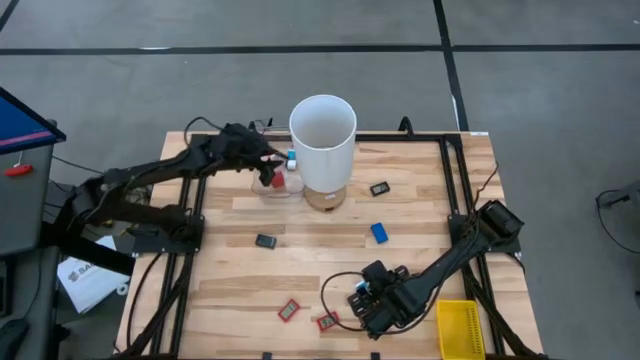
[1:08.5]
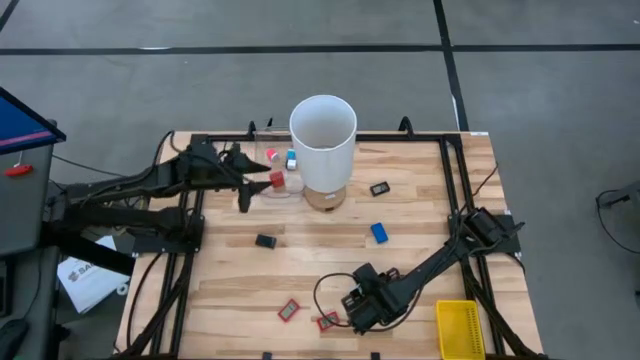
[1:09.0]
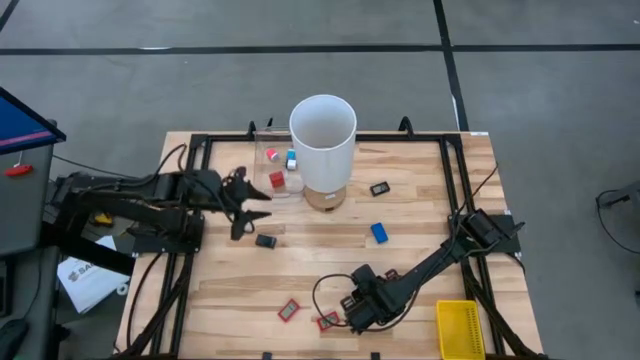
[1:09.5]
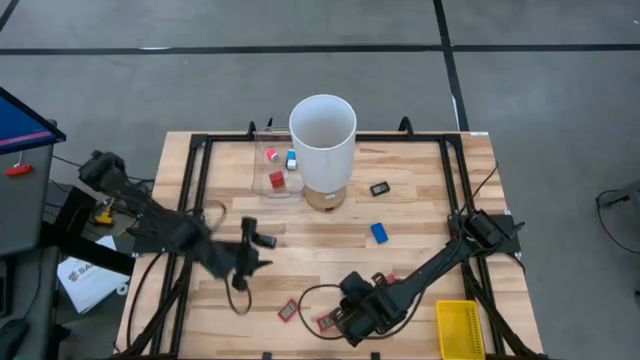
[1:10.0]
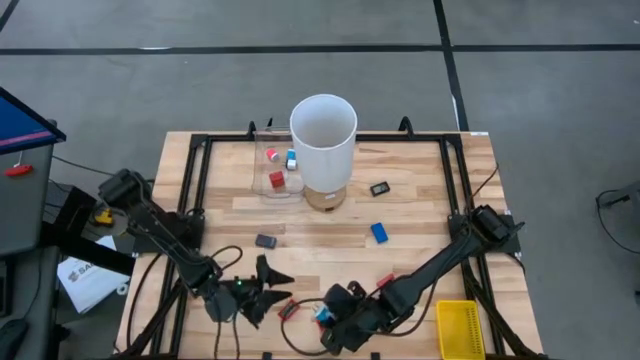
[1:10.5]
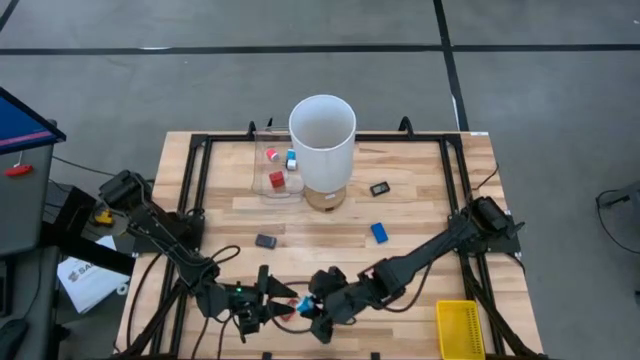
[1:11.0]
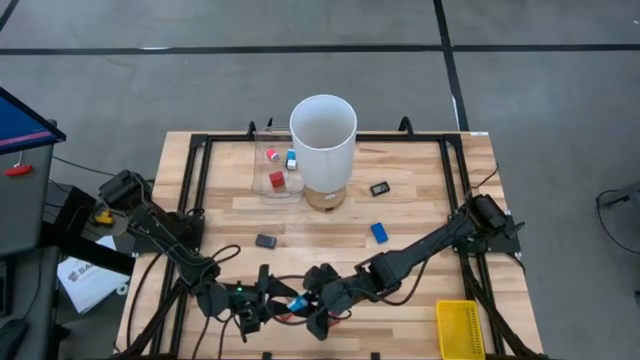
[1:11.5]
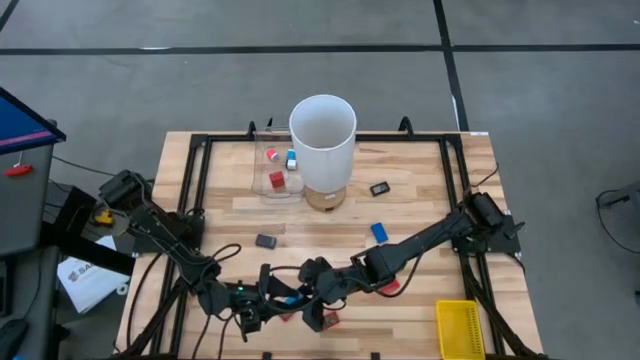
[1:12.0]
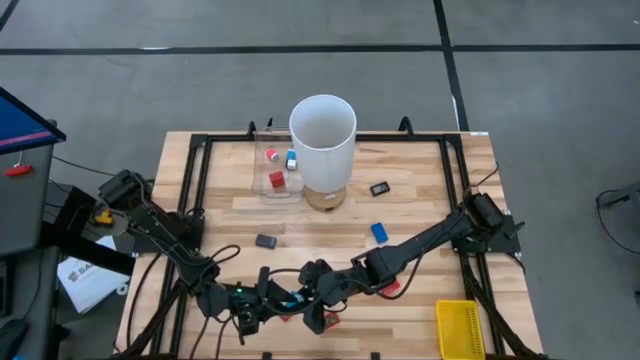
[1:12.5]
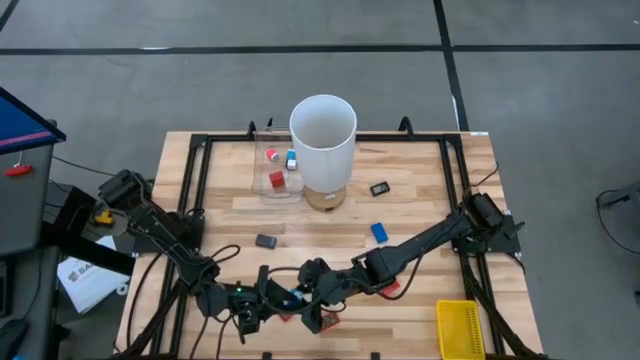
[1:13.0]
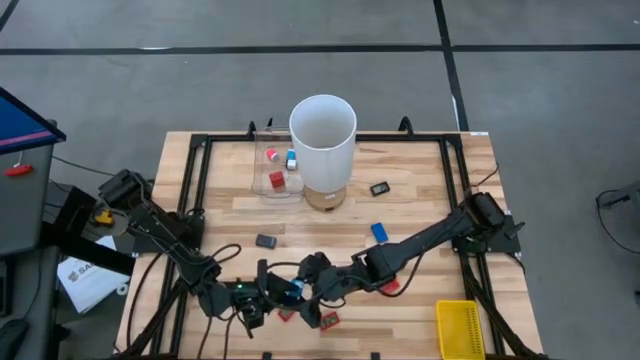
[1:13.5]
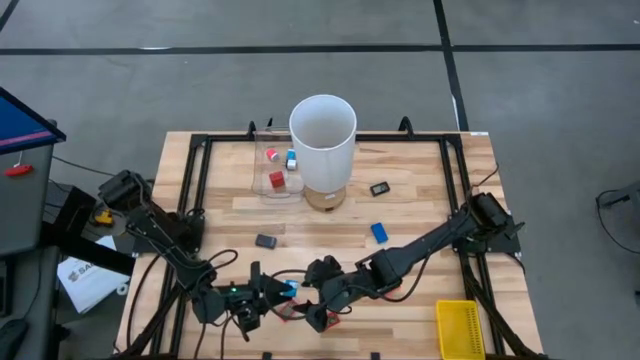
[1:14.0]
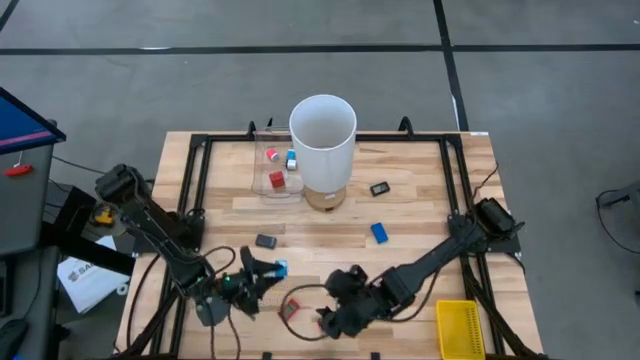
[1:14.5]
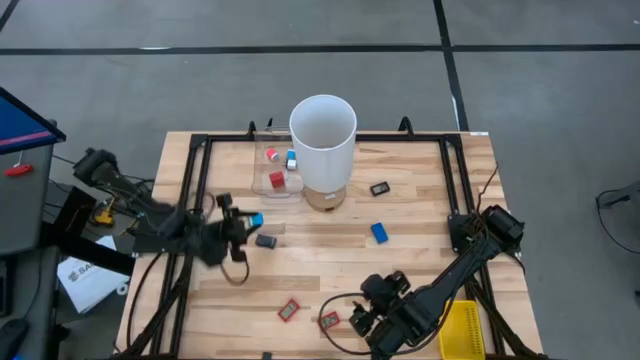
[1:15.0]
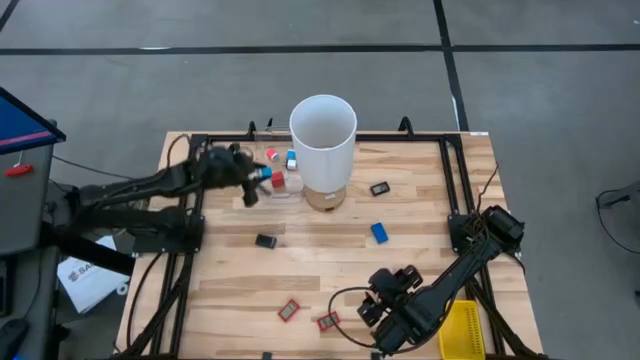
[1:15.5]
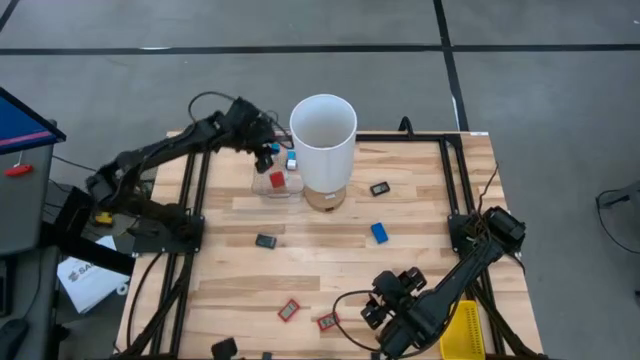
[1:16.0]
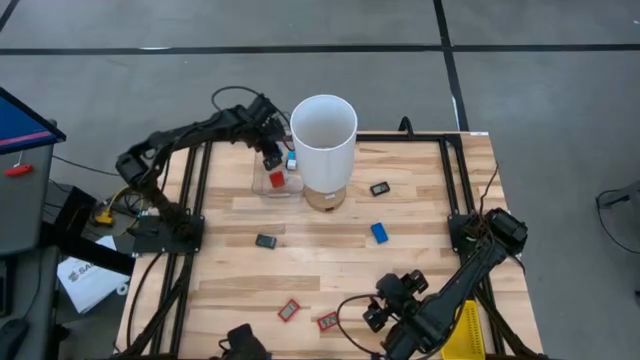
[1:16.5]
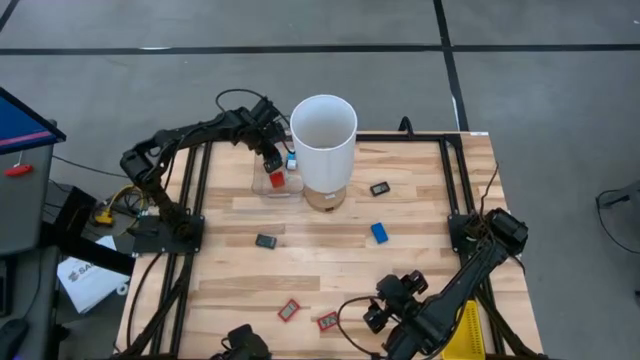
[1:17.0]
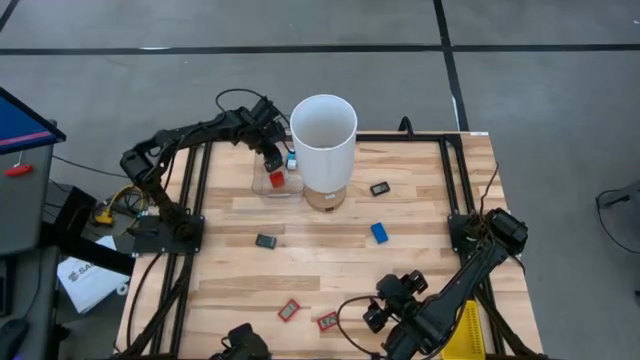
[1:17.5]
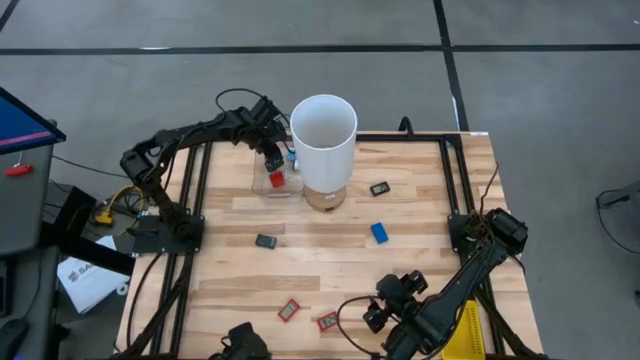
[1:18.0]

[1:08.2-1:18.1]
Task: Pick & Place Office items
Put the blue charger adapter into the transparent bin

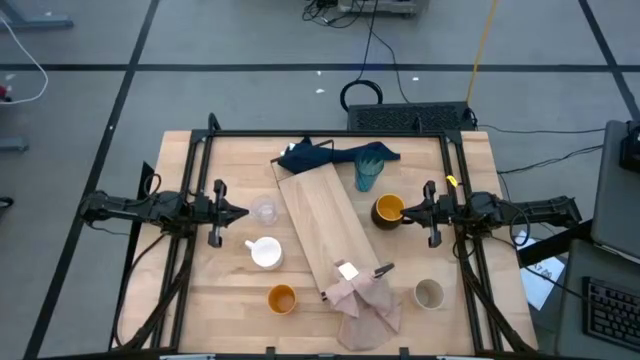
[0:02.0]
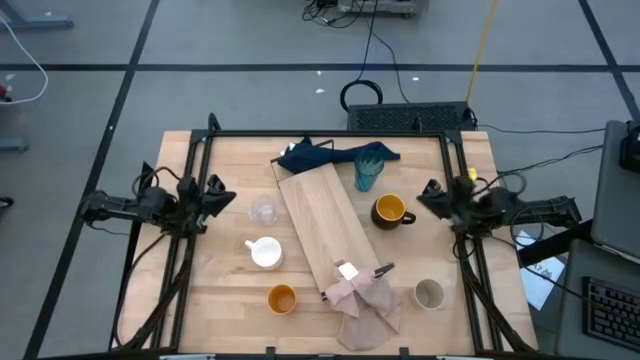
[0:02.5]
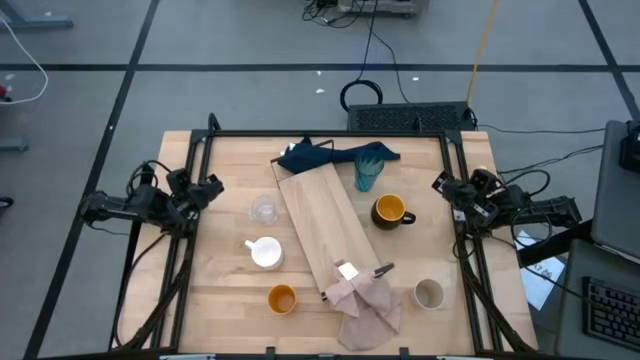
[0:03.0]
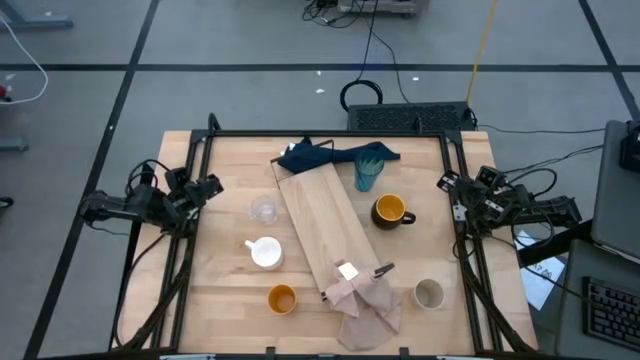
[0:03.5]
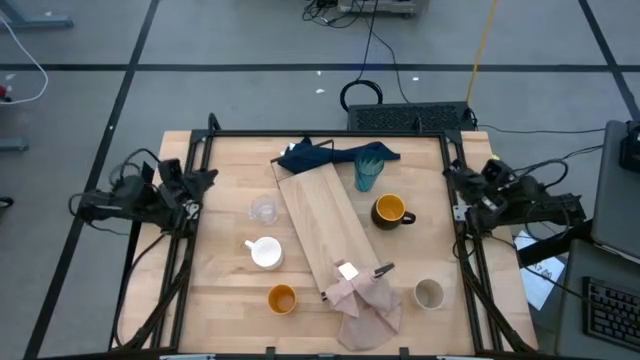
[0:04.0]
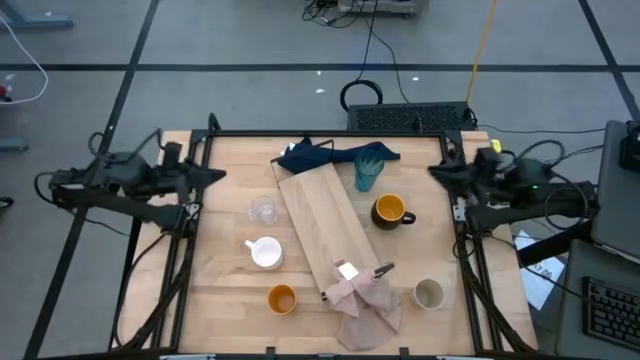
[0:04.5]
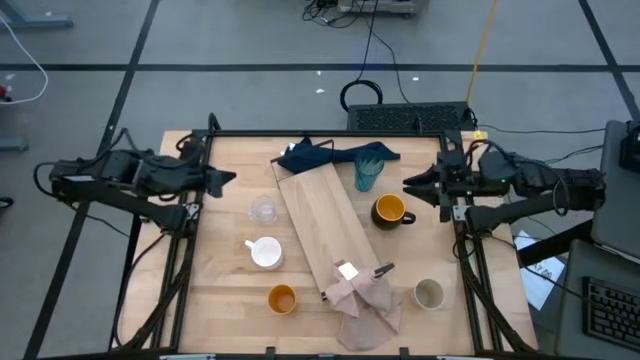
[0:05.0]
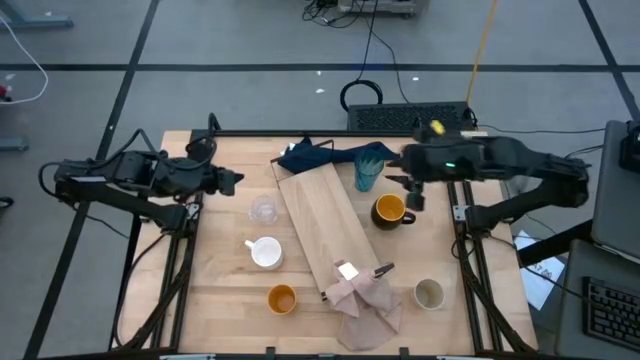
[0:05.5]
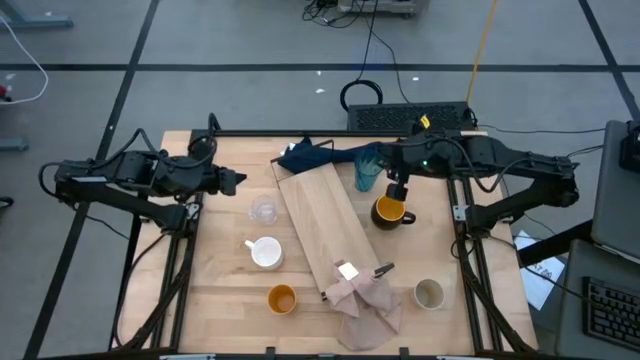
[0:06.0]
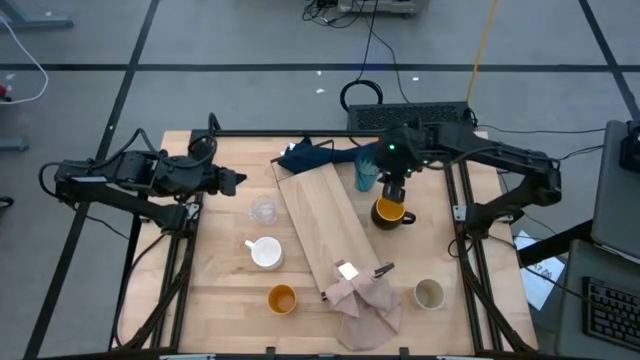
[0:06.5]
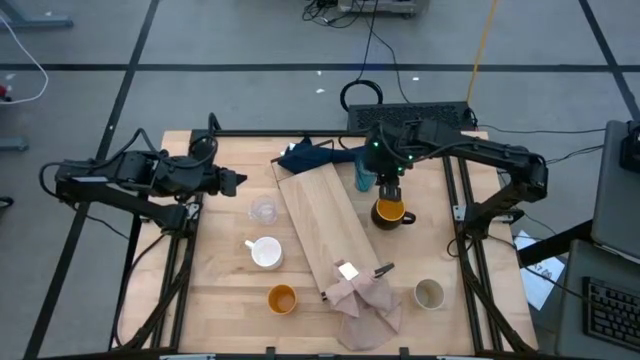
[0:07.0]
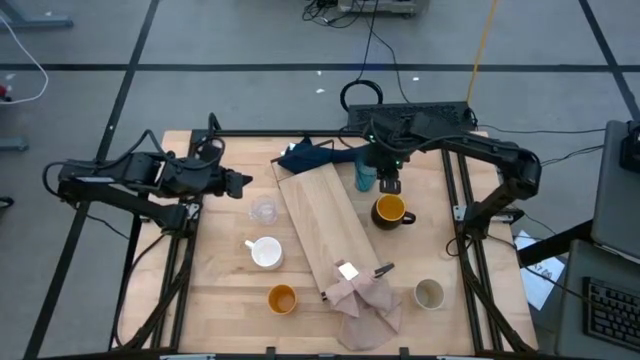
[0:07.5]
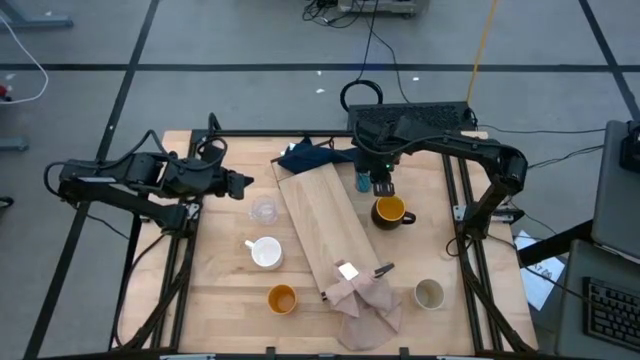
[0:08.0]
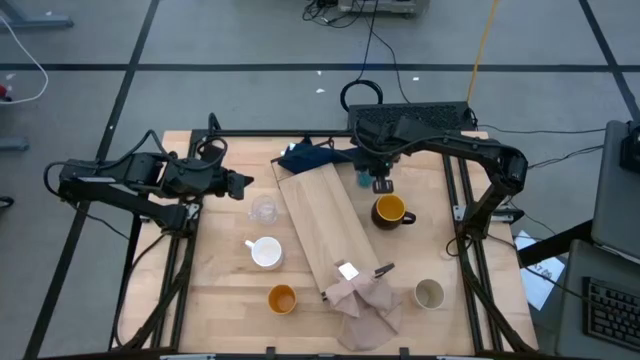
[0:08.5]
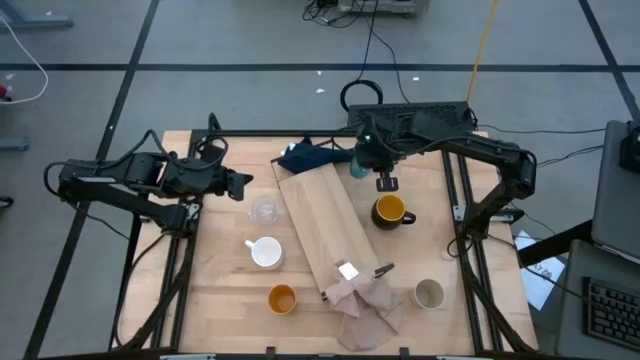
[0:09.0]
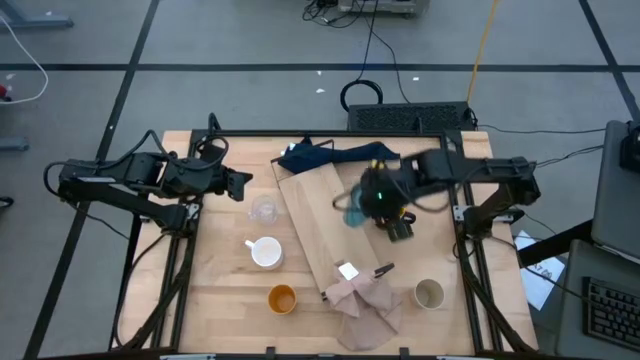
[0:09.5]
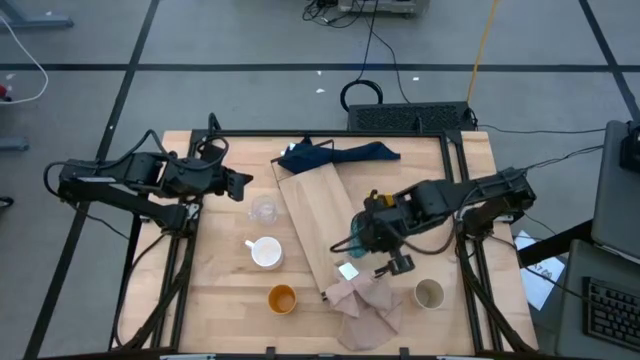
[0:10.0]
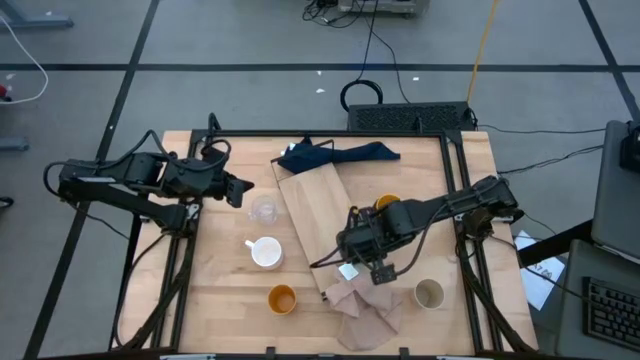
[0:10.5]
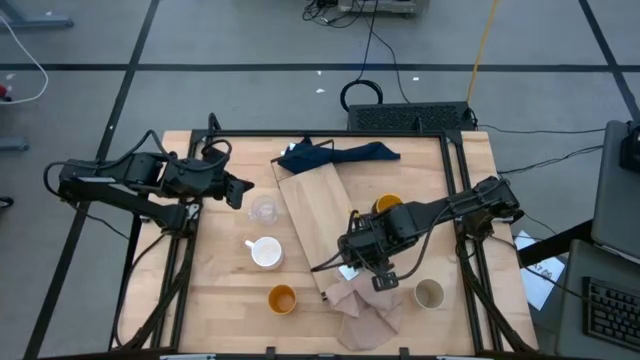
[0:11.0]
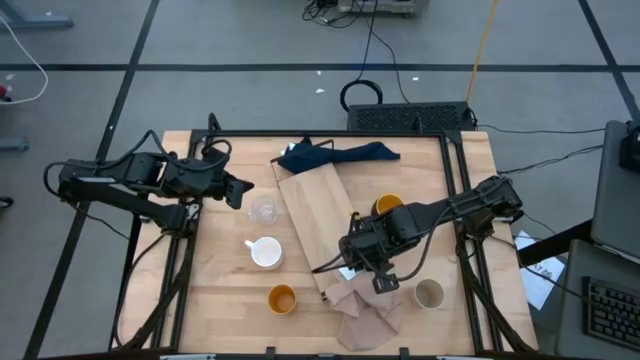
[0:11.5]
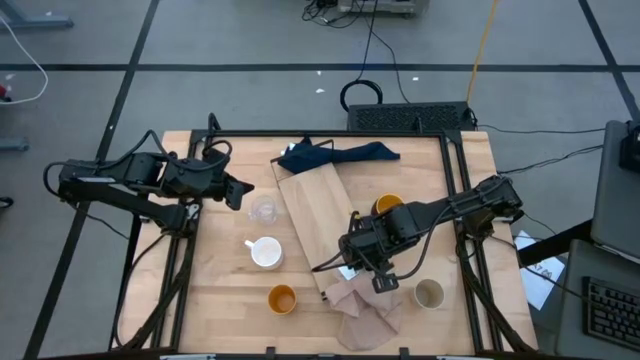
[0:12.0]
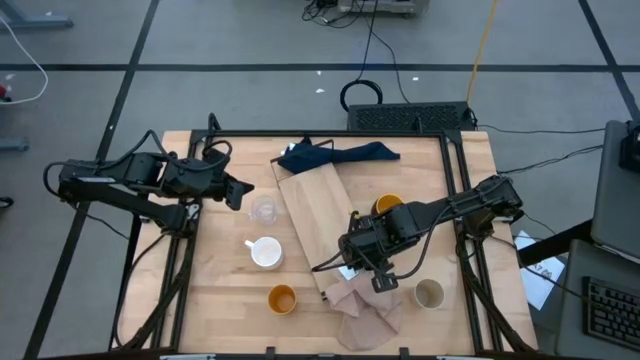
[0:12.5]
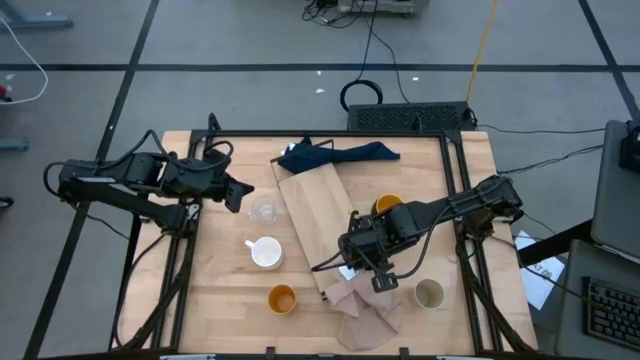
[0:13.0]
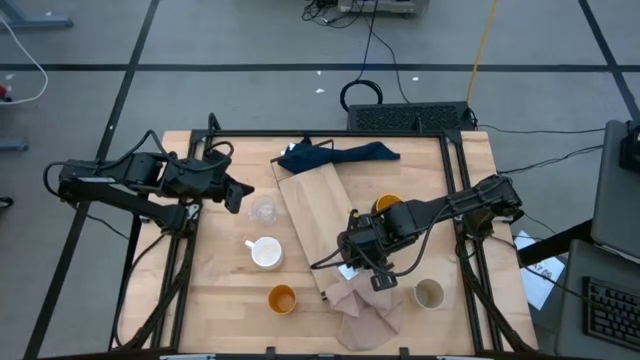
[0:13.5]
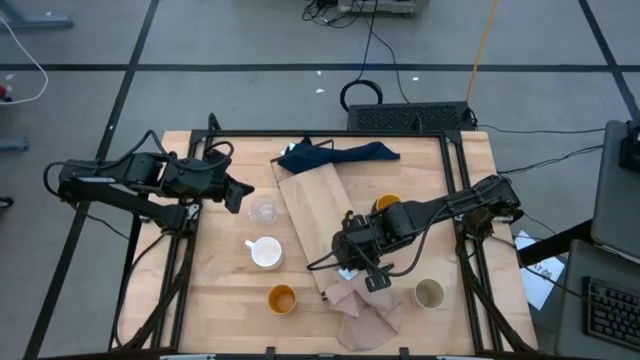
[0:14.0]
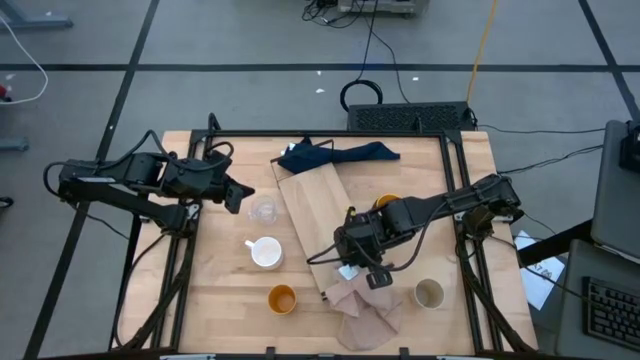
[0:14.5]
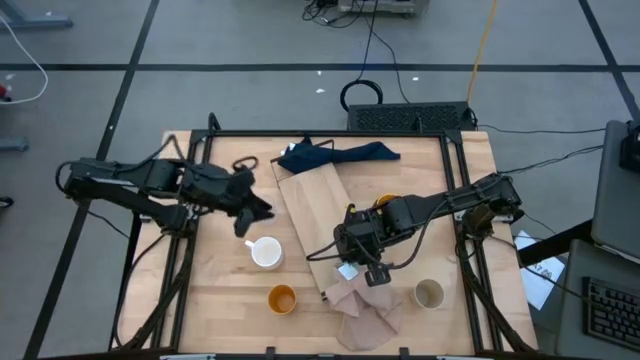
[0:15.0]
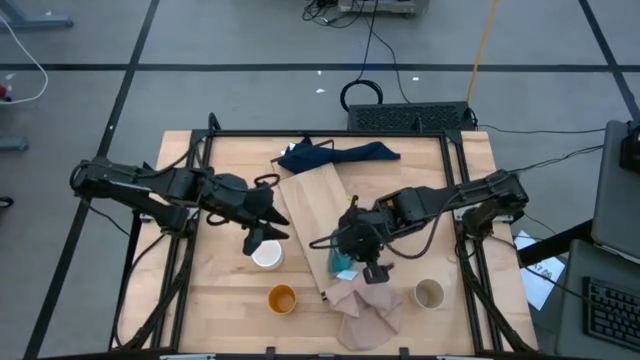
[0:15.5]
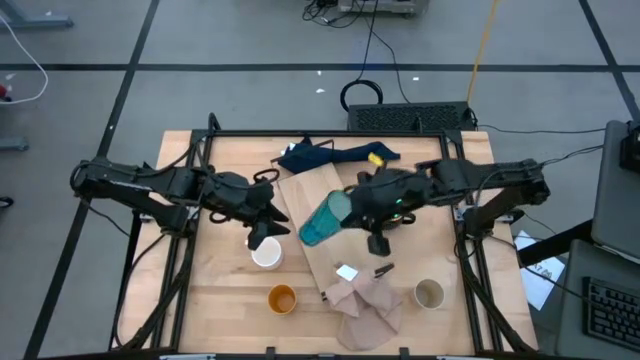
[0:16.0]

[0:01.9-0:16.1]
Task: Stack small to large cups/mugs on shelf
Put the blue cup on the shelf
